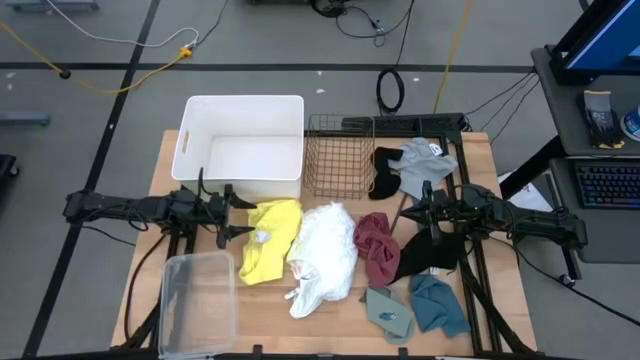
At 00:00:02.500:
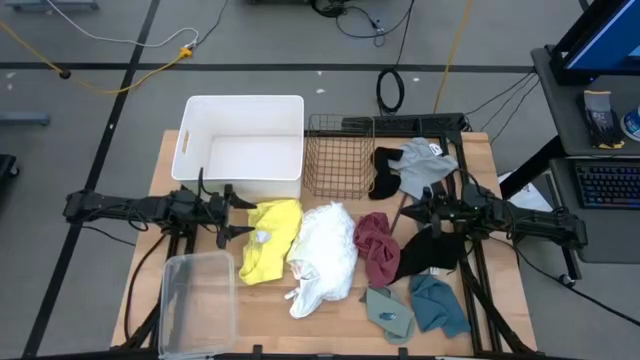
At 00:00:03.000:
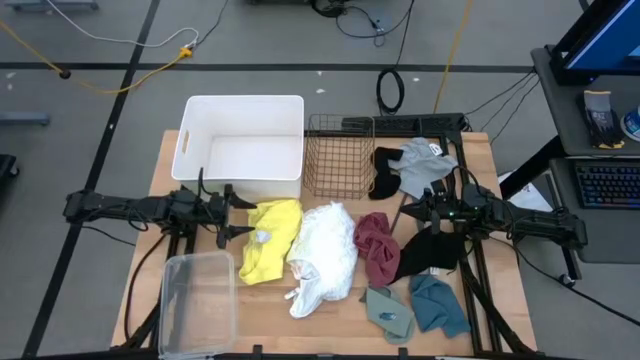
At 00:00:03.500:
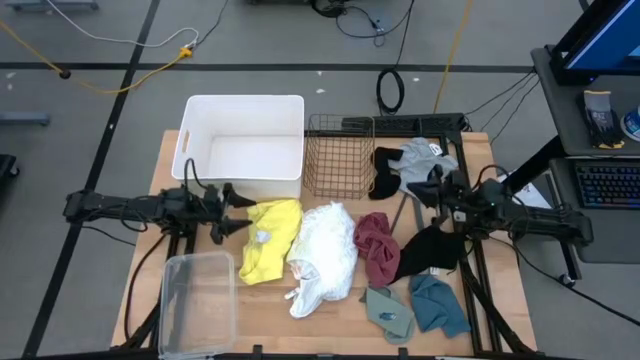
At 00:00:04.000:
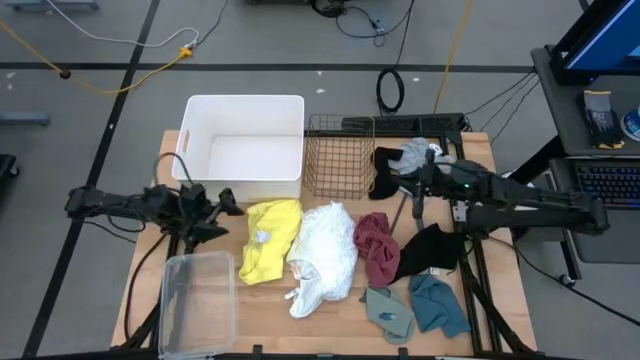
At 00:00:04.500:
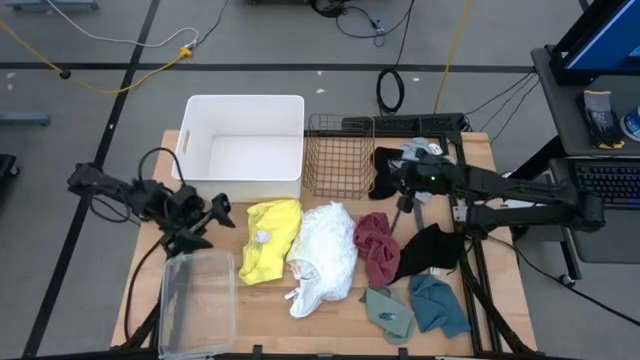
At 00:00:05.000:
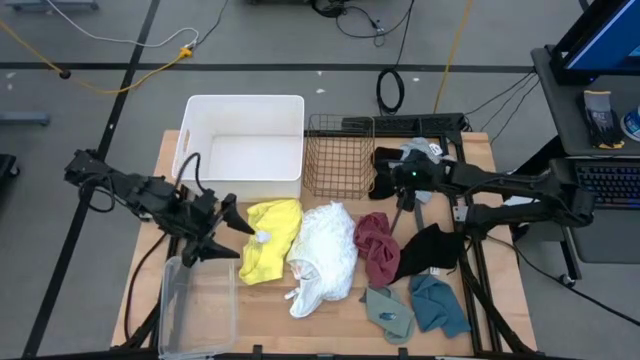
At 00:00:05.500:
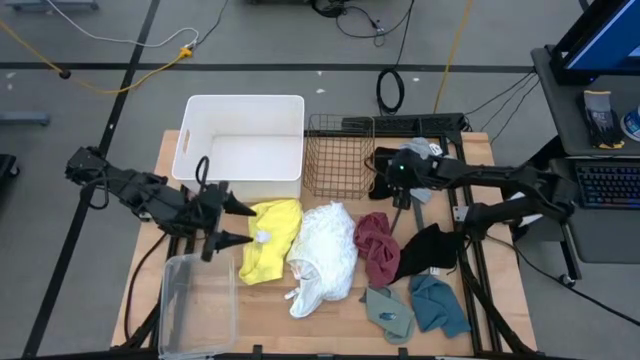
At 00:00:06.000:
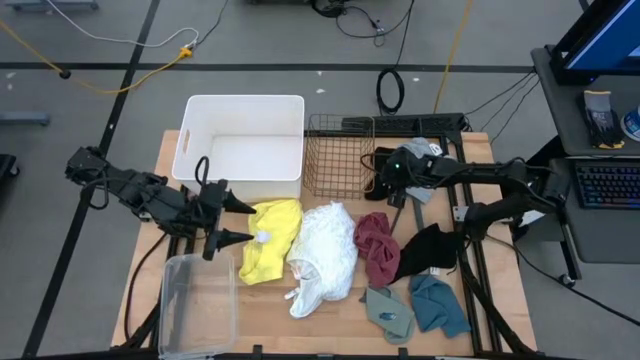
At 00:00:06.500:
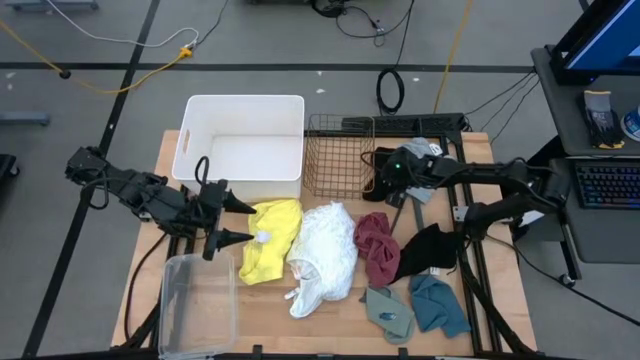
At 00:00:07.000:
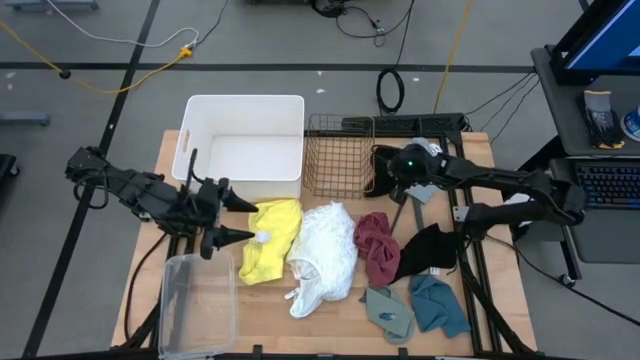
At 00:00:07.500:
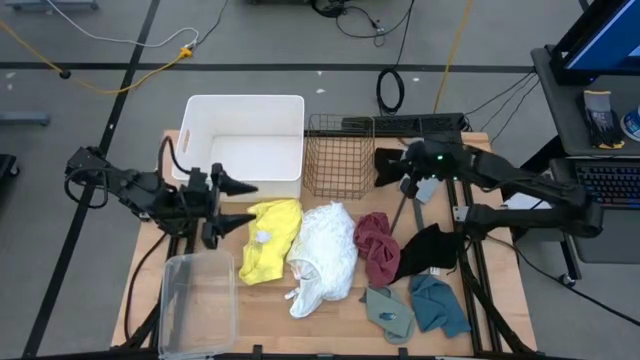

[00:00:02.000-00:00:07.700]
Task: Pick & Place Cloths
Put the black sock into the transparent bin

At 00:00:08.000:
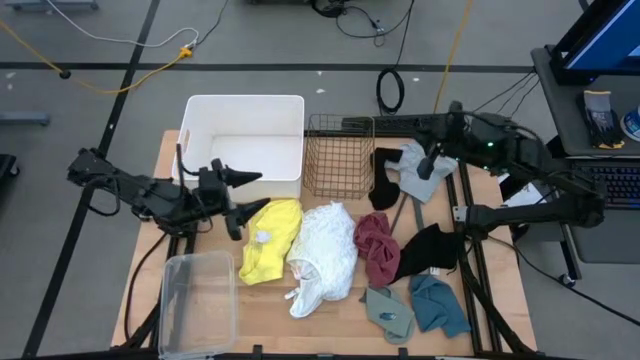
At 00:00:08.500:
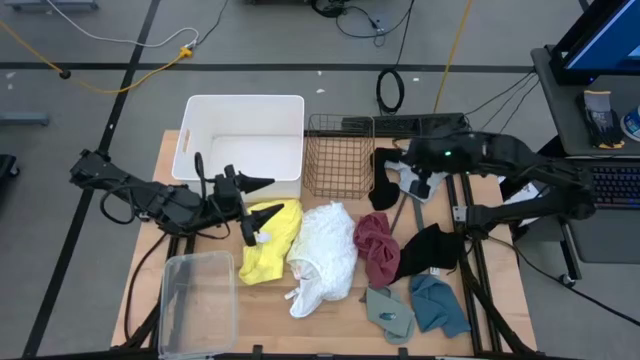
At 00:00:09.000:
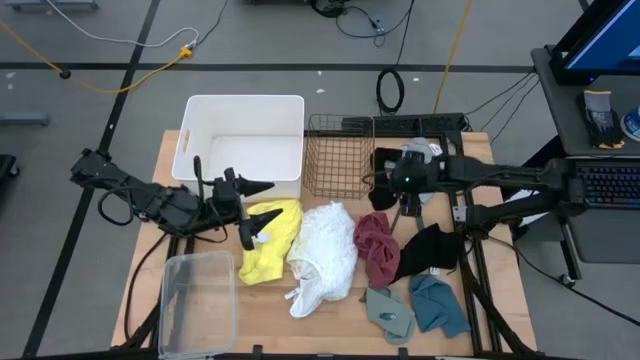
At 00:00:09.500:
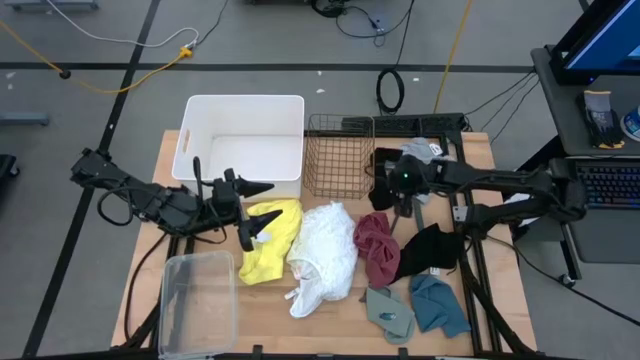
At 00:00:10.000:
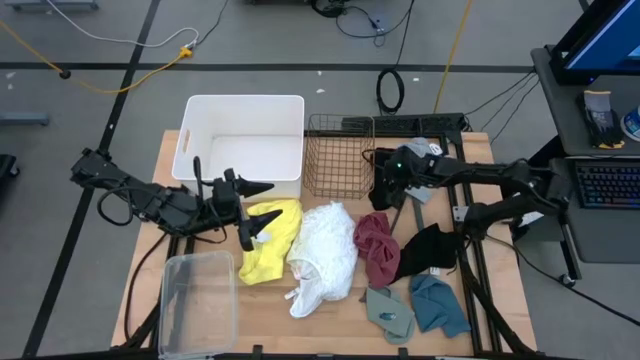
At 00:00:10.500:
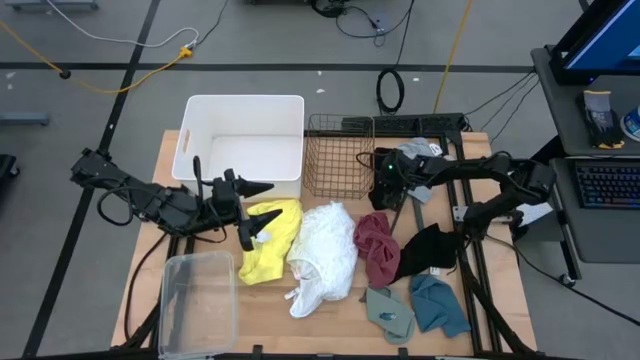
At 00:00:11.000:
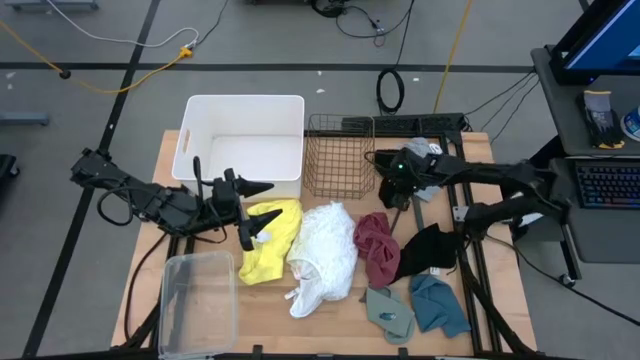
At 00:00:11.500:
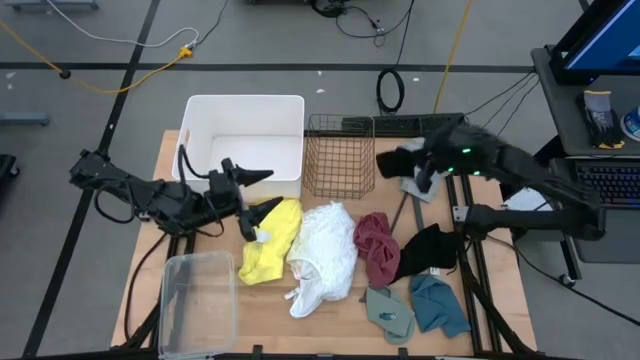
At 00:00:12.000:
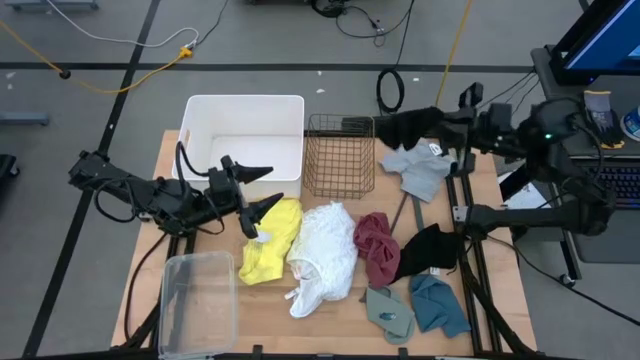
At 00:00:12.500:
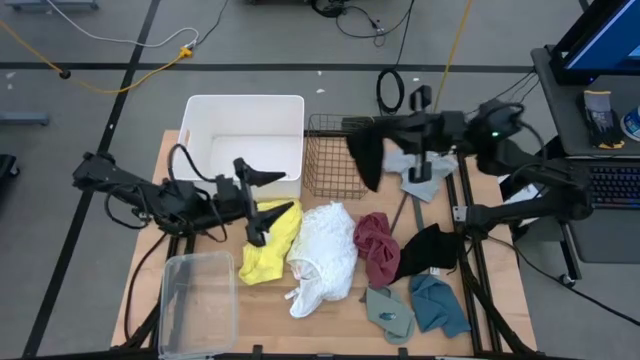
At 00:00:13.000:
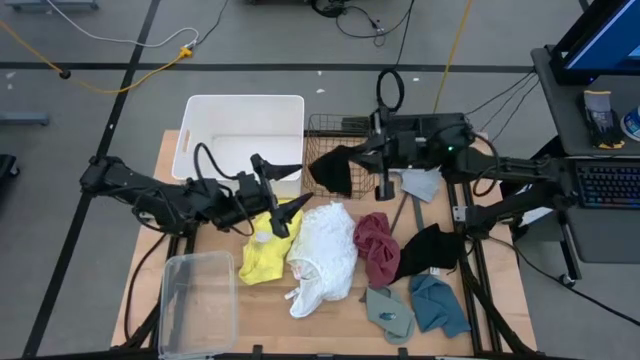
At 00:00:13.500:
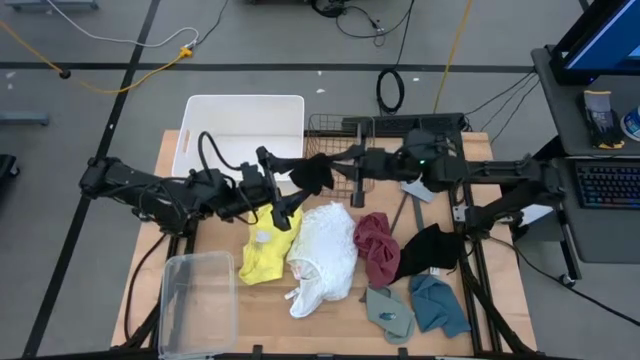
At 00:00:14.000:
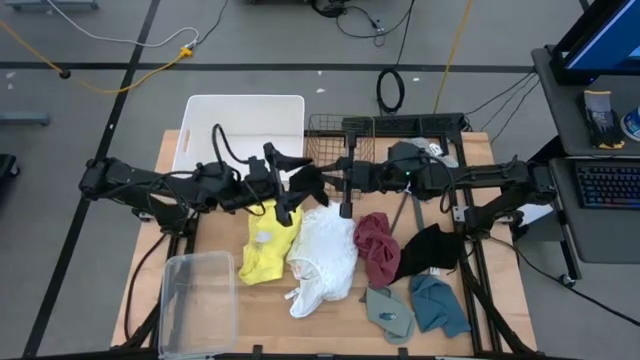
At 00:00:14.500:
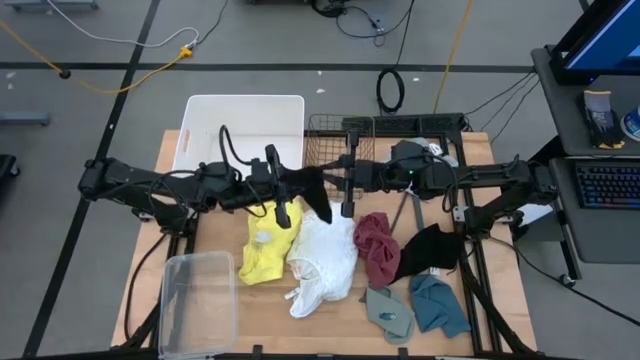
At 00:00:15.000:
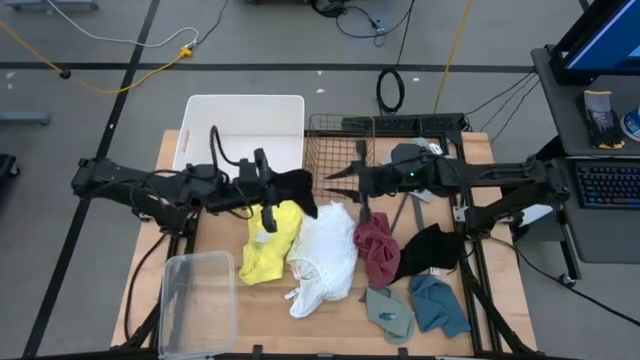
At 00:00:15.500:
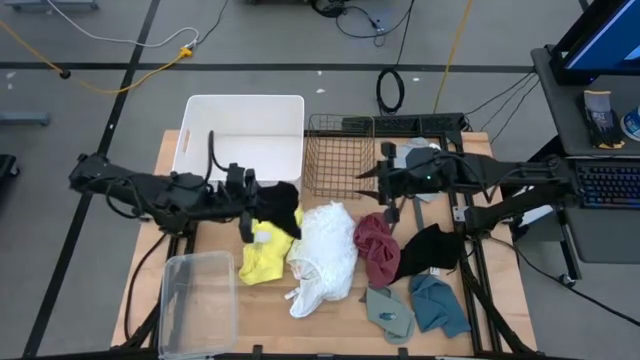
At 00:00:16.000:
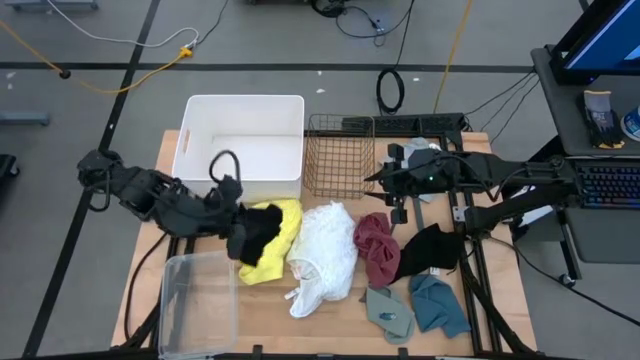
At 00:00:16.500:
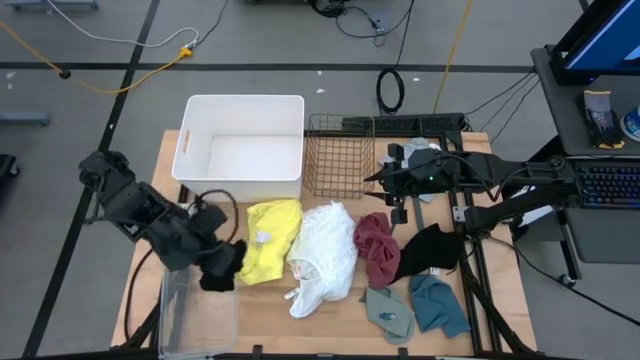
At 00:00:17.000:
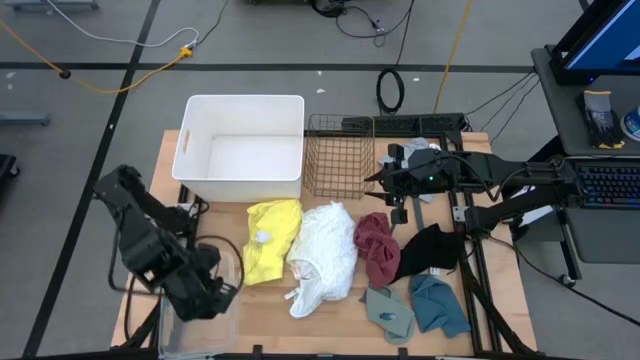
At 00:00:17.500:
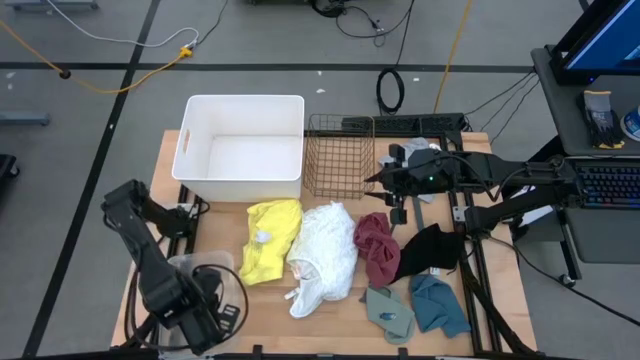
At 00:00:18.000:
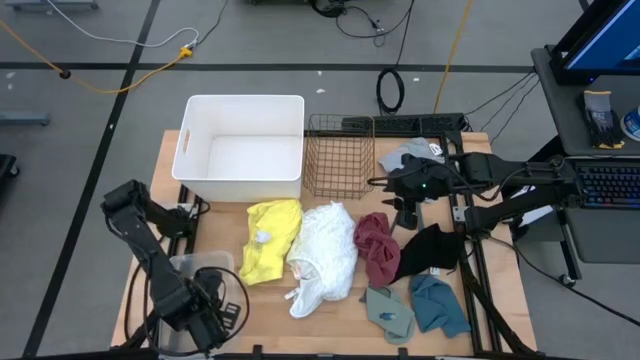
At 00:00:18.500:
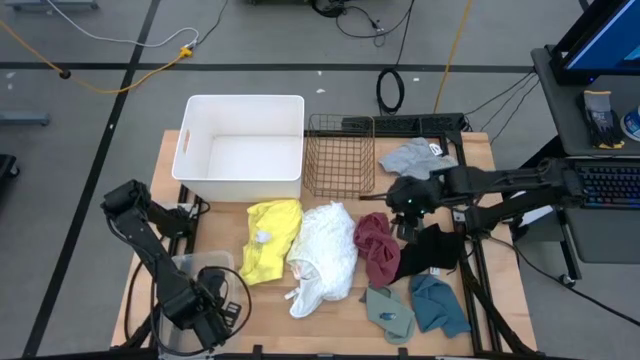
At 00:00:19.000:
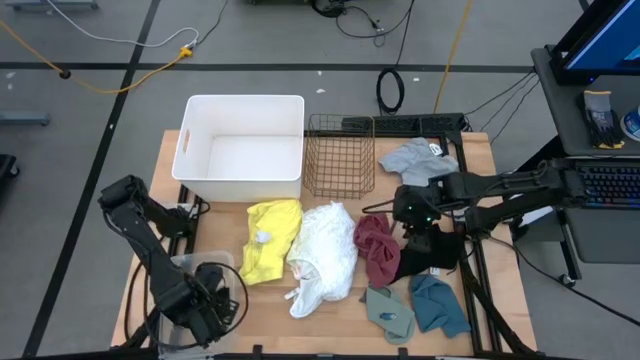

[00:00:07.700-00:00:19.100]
Put the black sock into the transparent bin

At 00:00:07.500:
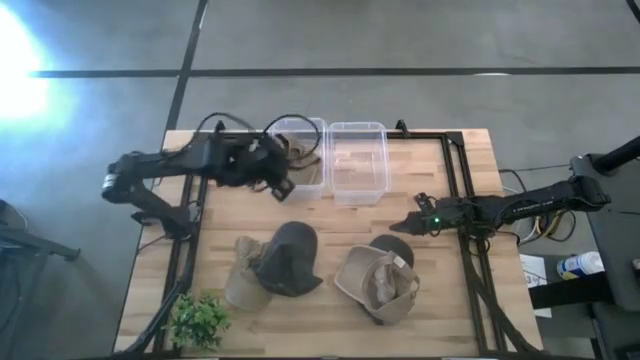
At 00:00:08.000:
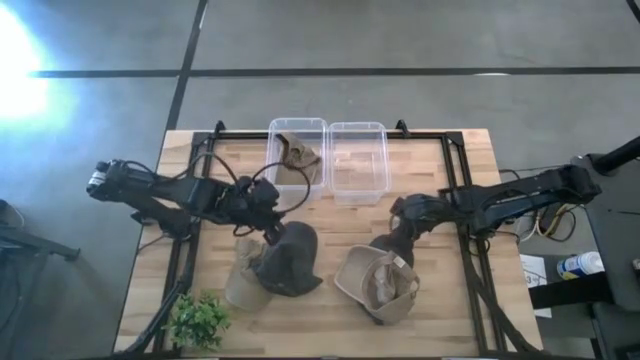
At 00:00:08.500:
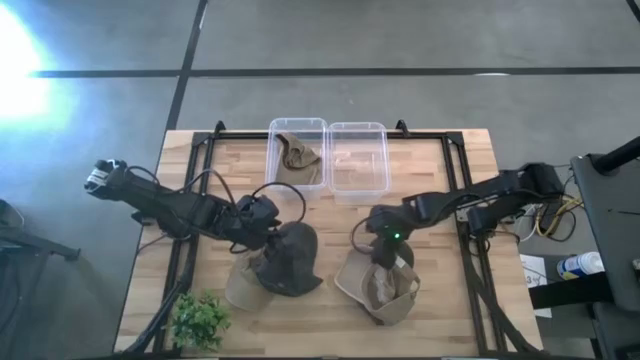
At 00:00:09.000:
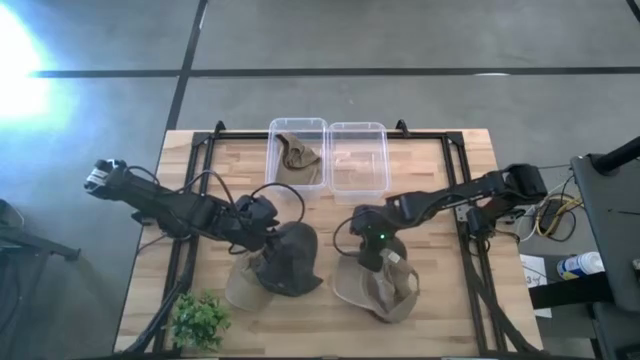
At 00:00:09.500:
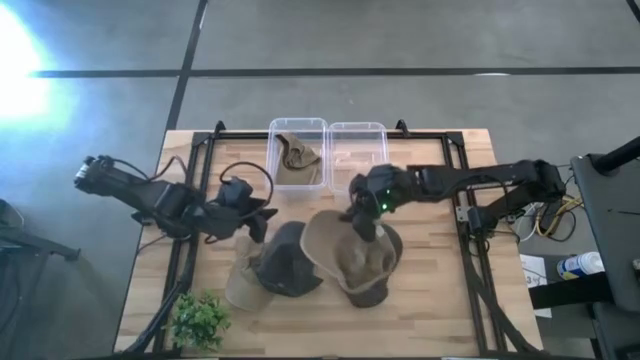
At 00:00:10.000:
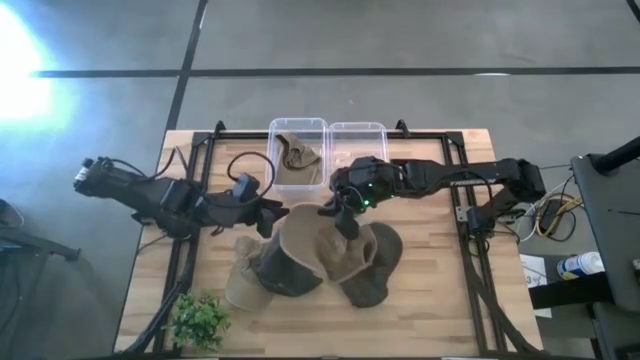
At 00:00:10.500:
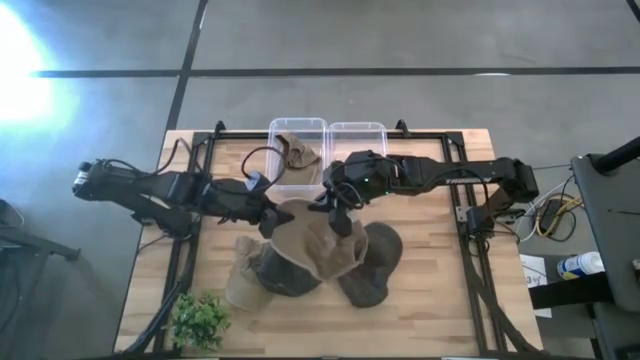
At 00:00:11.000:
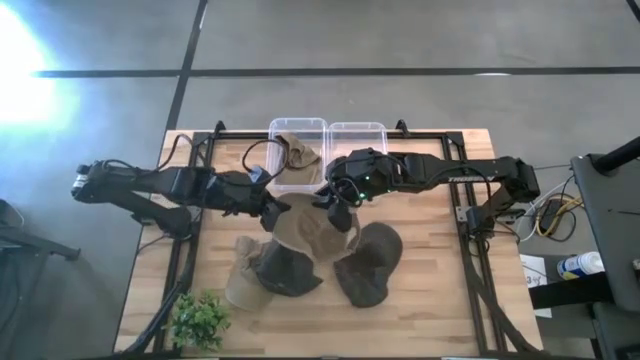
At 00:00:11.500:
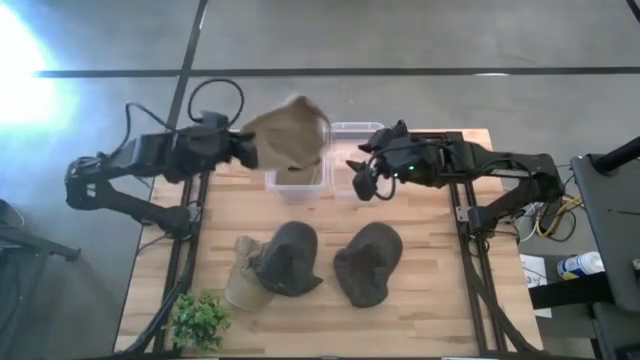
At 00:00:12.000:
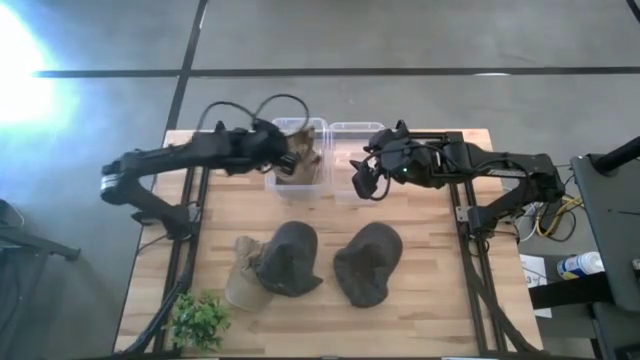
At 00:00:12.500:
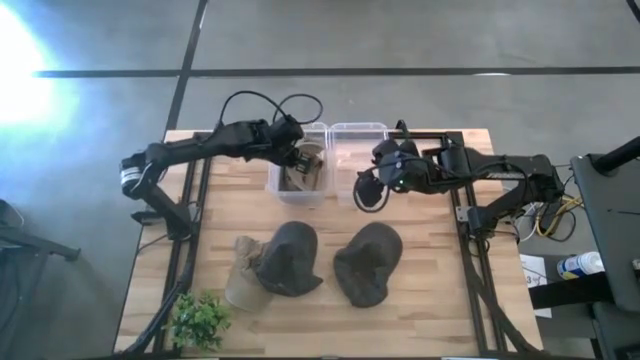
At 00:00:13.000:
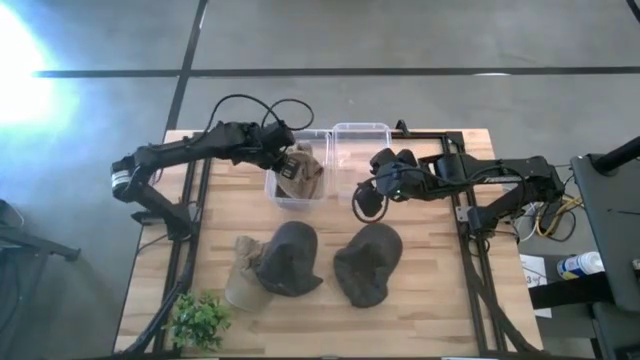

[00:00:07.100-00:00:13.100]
Task: Pick & Place hat
Put the right brown cap into the left transparent bin
